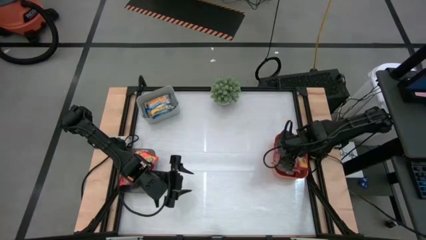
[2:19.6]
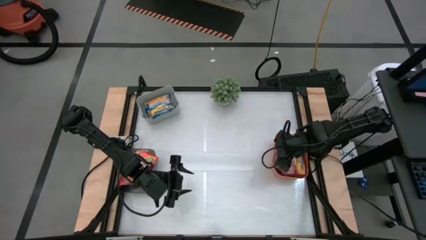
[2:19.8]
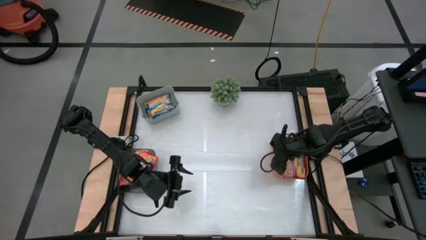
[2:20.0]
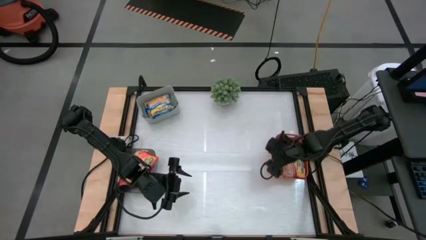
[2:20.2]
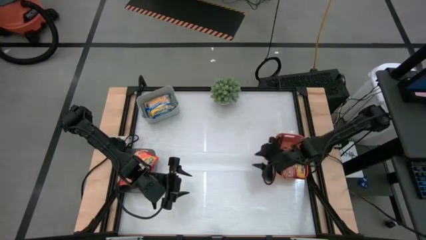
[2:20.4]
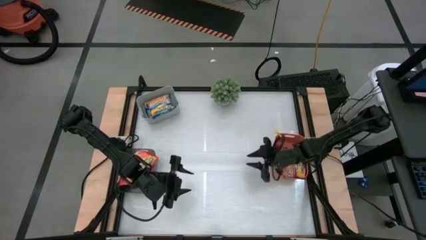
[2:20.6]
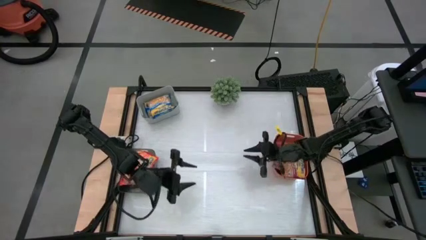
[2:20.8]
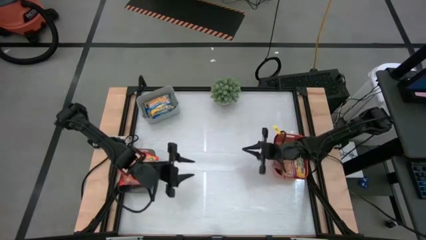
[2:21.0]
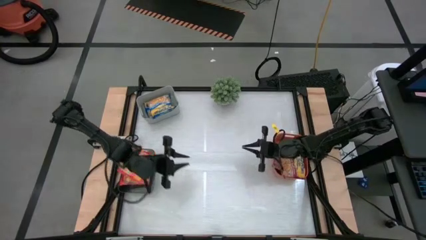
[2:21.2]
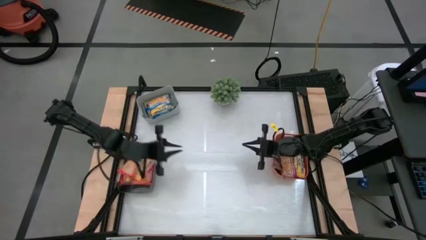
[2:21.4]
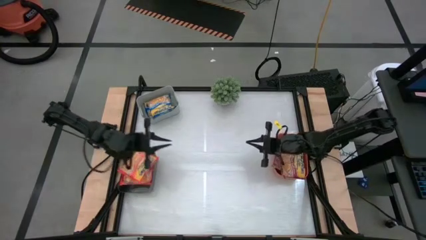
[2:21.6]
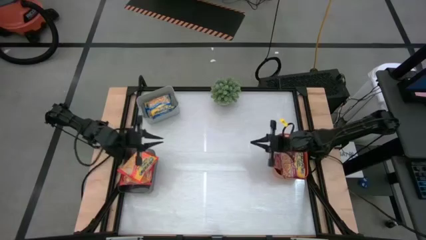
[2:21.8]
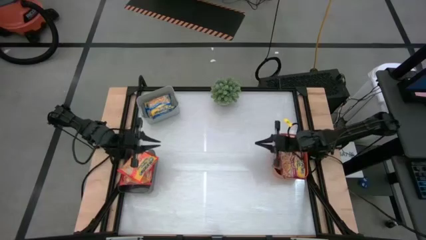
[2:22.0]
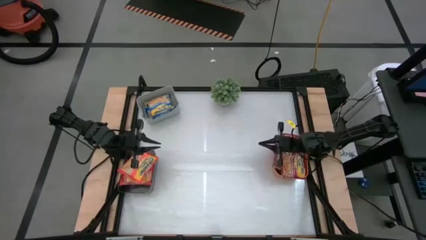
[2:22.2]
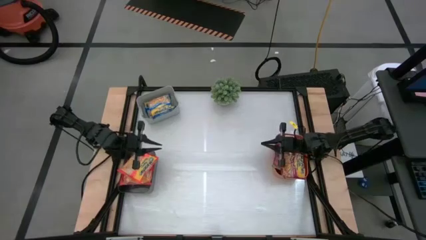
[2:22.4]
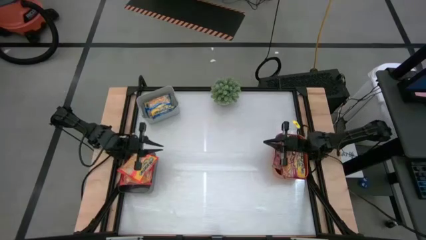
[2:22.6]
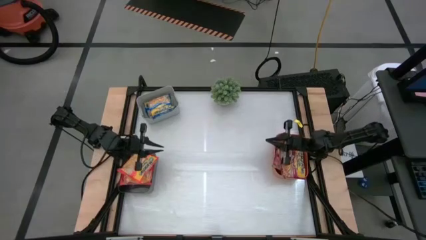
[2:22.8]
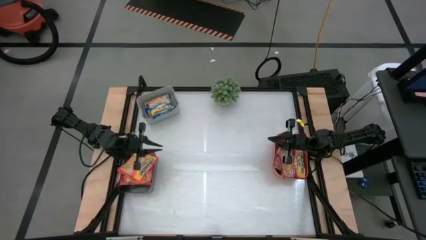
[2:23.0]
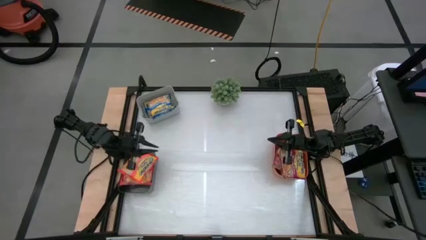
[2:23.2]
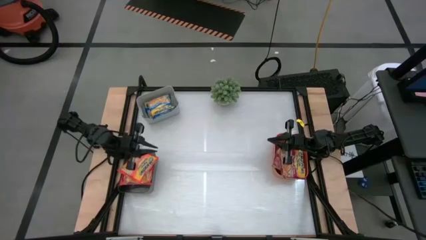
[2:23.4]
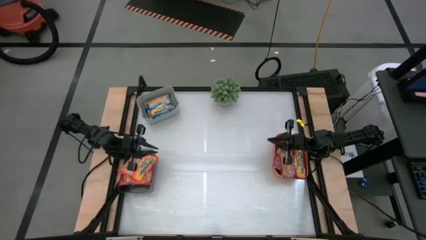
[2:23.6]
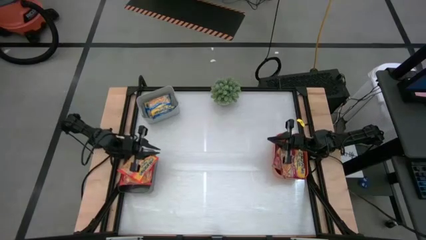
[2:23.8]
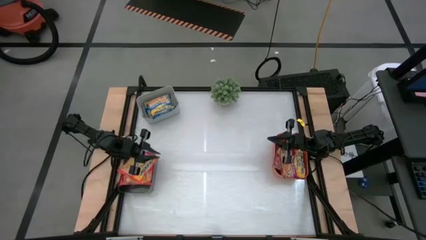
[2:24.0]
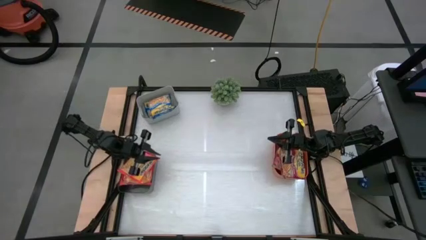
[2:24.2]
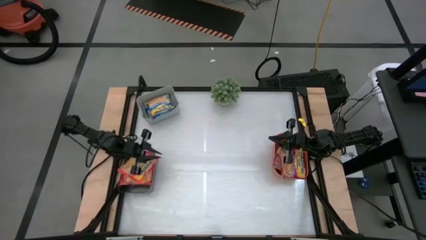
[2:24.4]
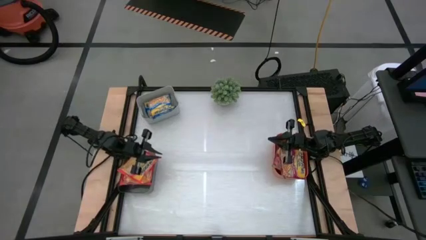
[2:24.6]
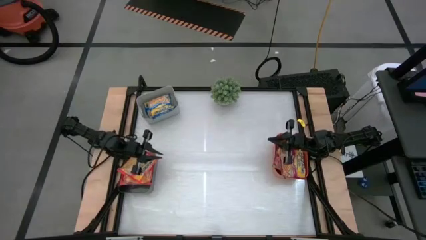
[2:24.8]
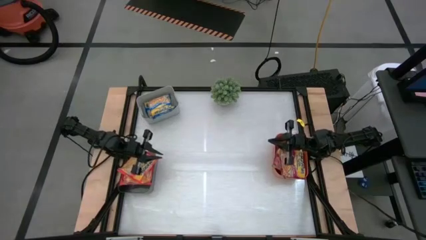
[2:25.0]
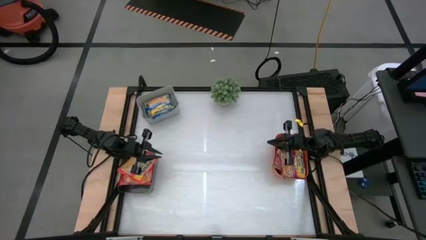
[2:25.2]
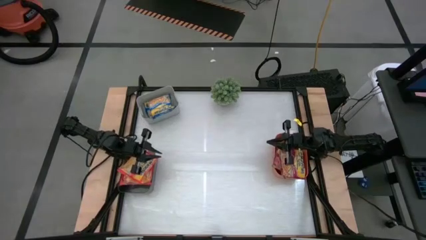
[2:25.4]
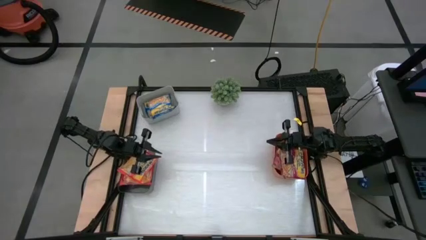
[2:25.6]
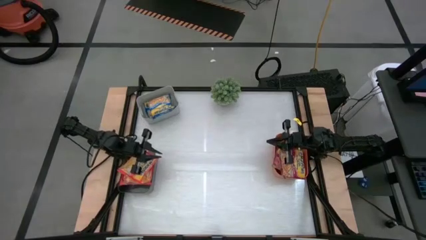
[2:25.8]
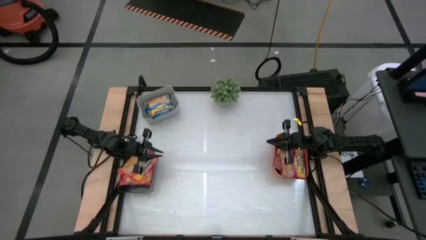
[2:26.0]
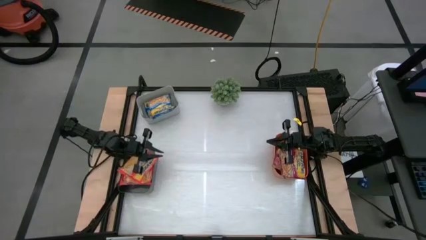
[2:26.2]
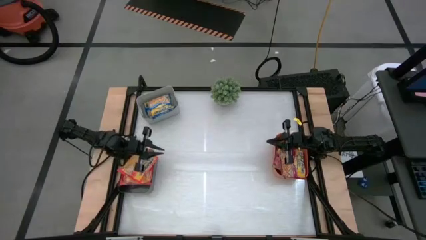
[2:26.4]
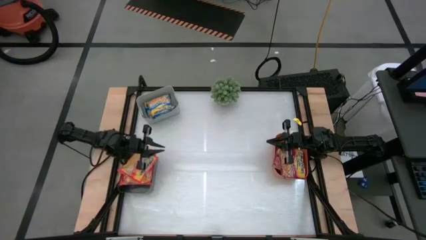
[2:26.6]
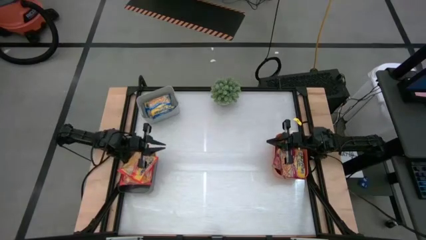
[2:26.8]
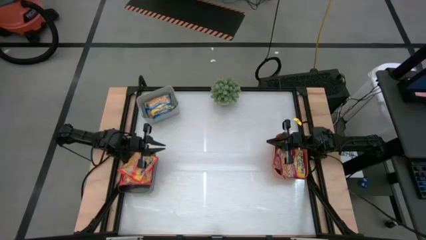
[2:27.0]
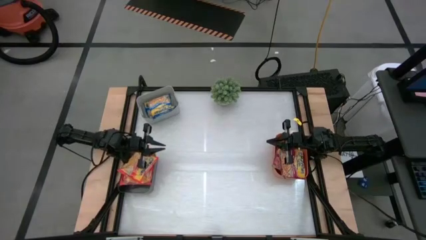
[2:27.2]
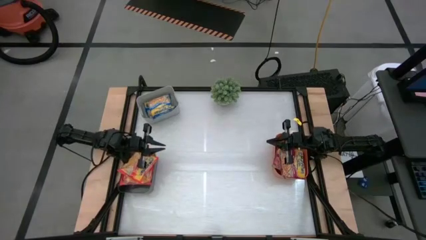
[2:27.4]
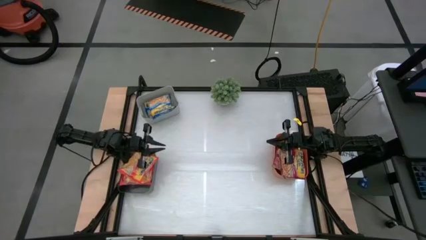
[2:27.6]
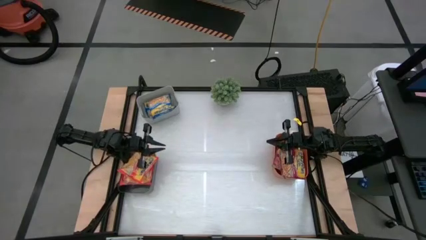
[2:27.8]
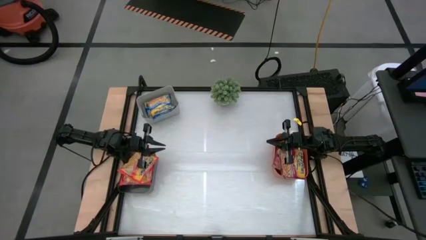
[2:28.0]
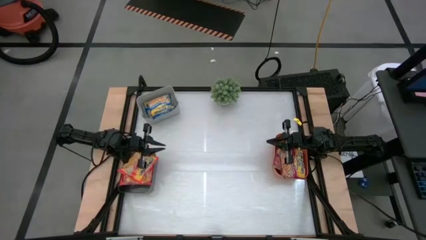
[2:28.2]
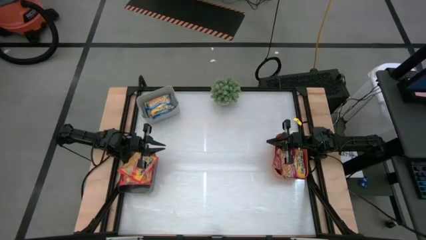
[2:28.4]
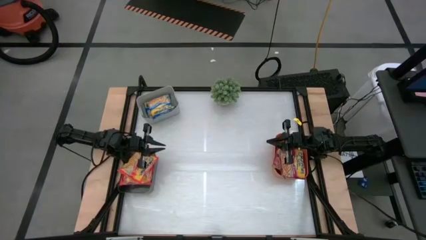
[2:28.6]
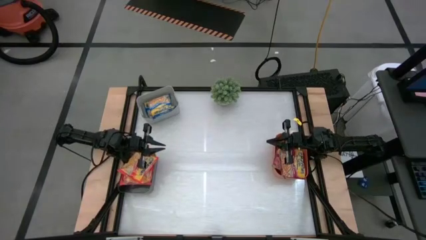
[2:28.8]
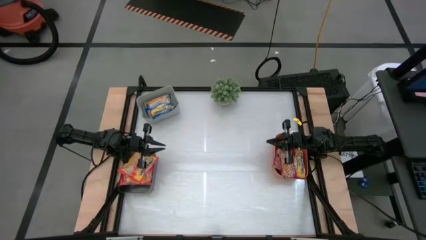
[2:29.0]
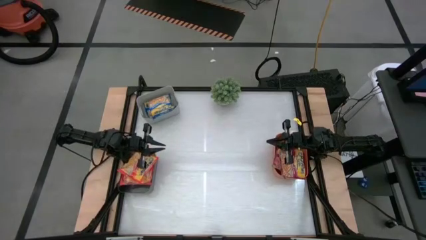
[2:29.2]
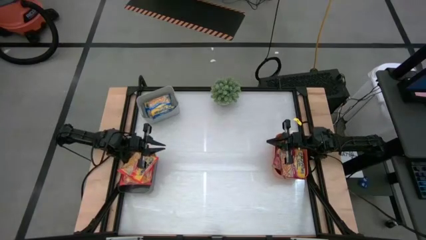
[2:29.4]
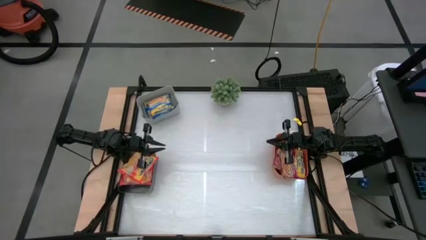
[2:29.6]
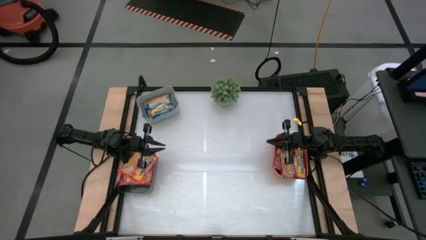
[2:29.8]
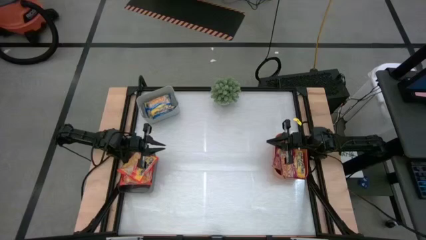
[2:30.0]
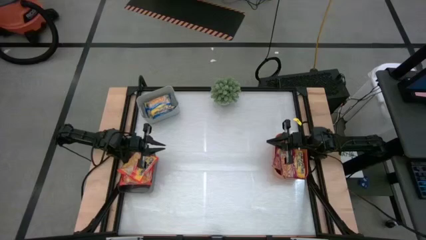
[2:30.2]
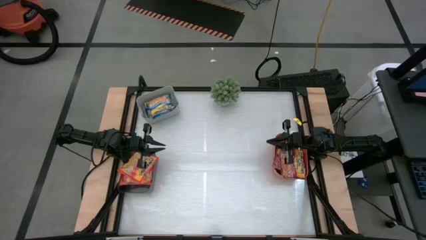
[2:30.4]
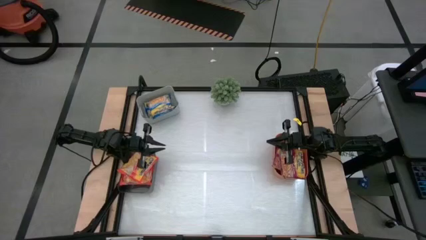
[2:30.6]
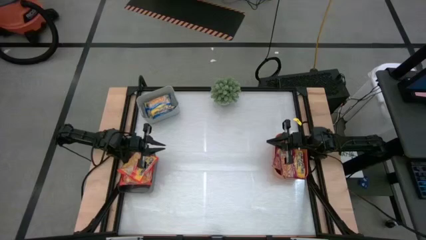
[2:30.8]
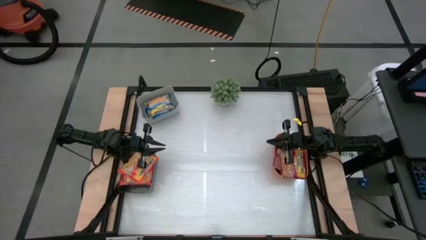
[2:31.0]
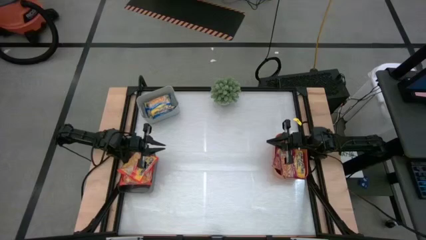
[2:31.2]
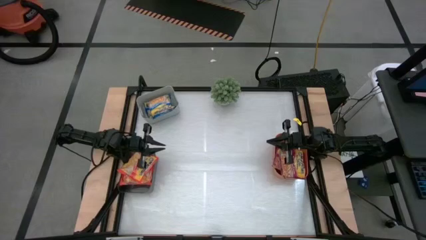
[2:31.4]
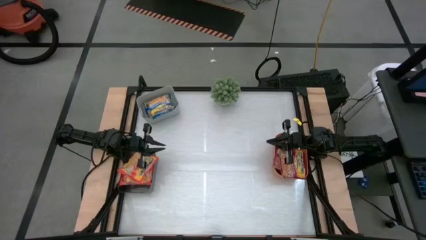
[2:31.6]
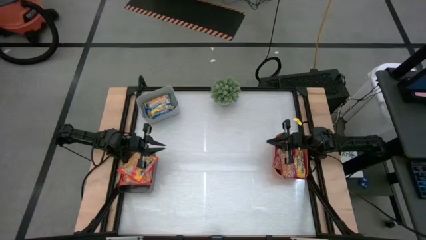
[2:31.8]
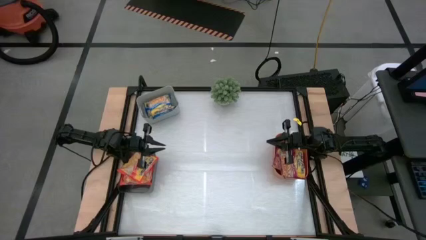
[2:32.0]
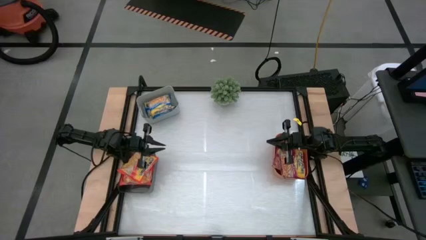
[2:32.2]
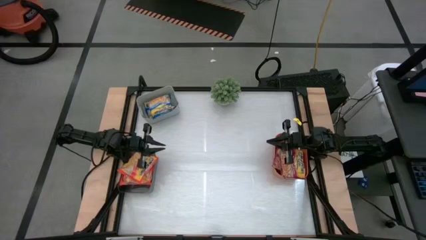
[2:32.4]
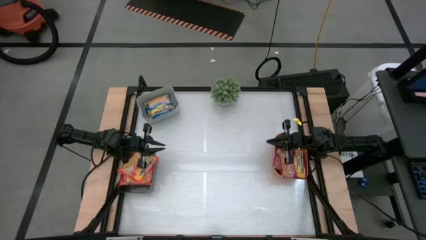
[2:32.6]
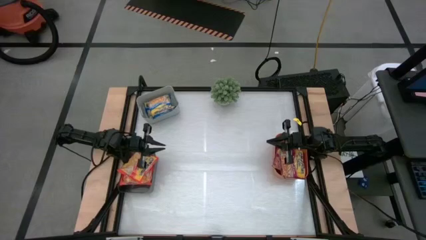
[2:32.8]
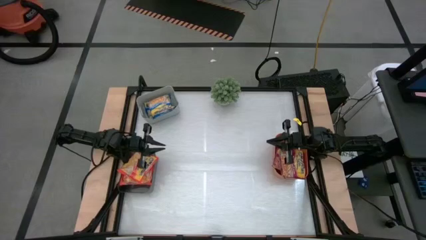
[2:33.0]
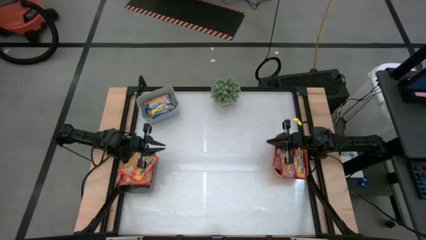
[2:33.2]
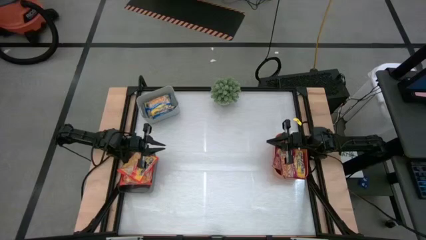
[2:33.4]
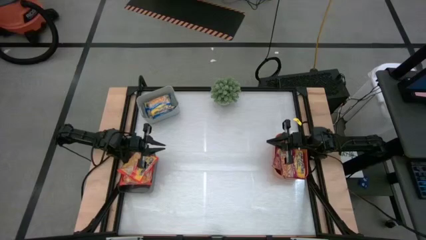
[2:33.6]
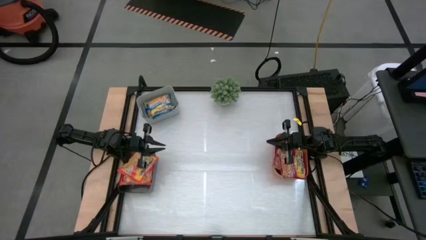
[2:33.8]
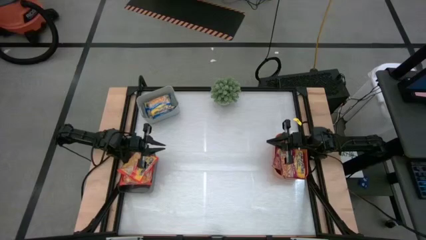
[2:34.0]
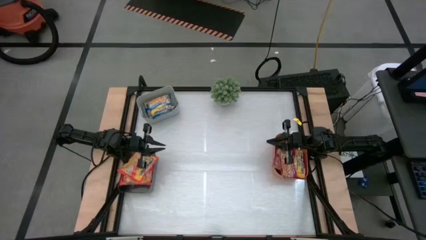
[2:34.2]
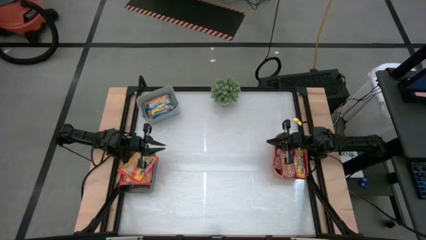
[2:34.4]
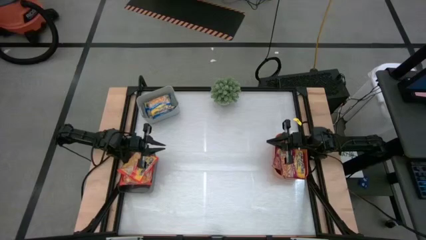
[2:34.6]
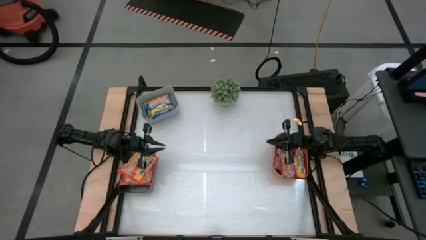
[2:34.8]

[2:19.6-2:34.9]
Task: Sort Maruchan noodles
Return to Home Position
